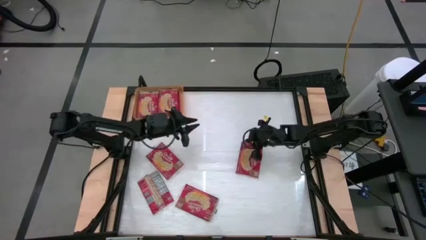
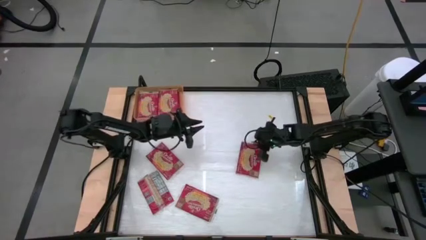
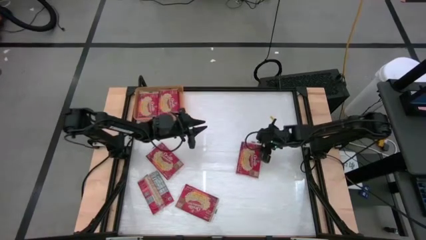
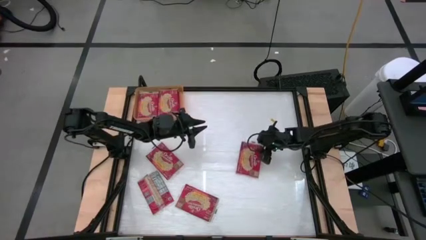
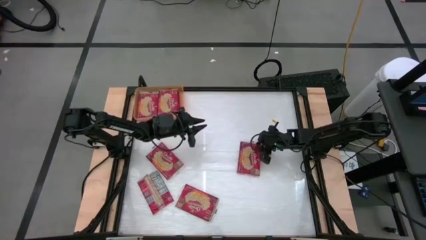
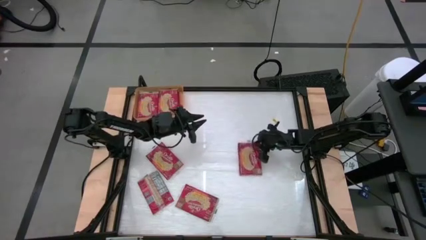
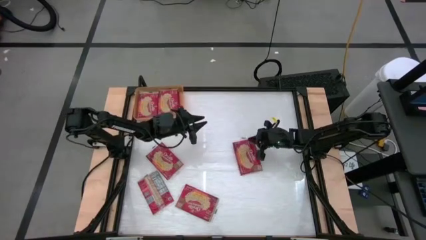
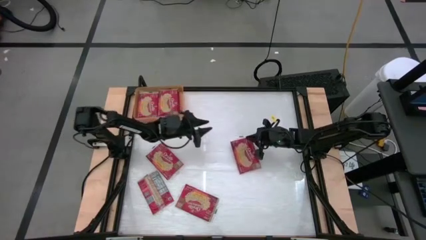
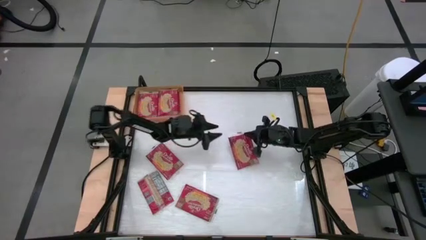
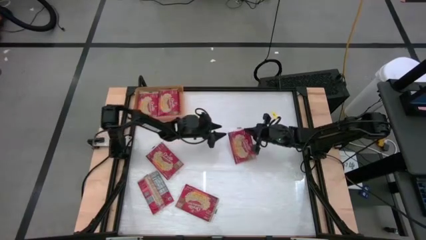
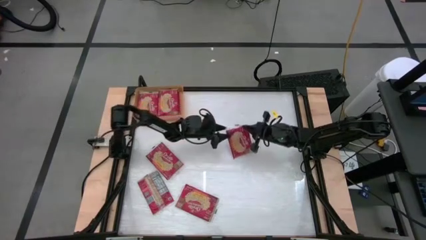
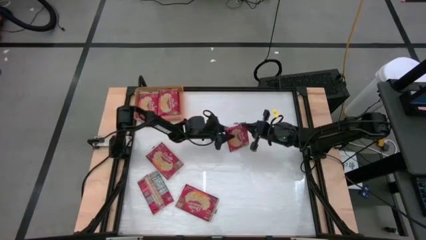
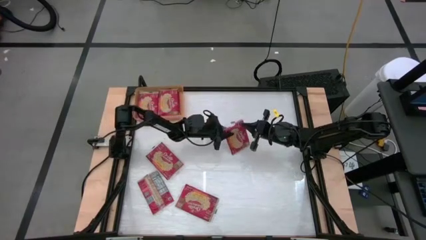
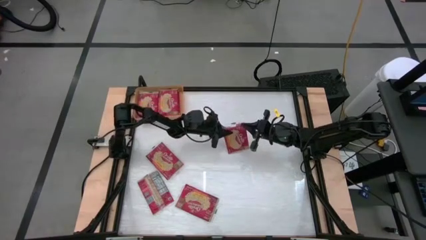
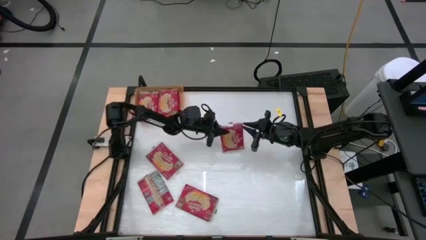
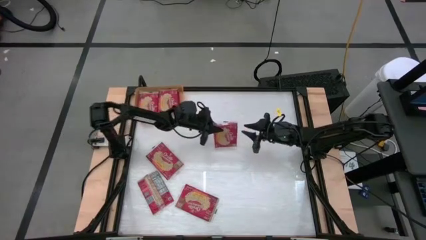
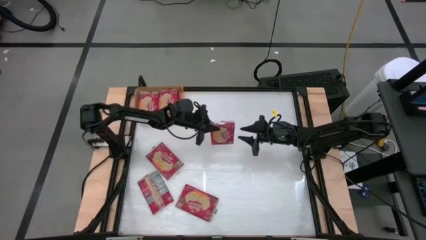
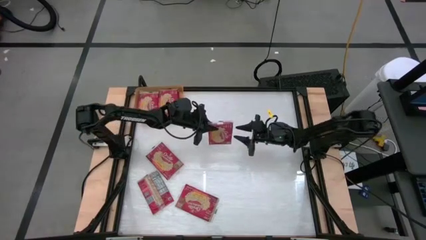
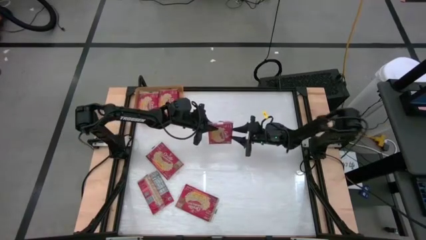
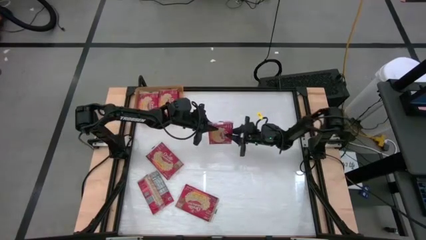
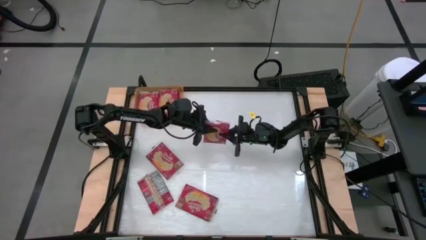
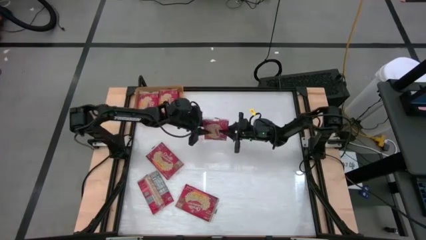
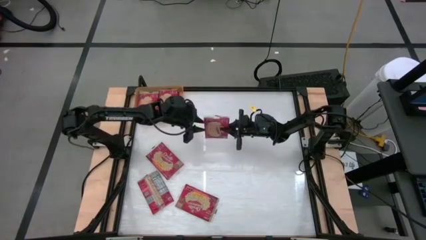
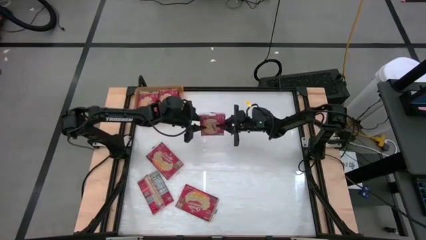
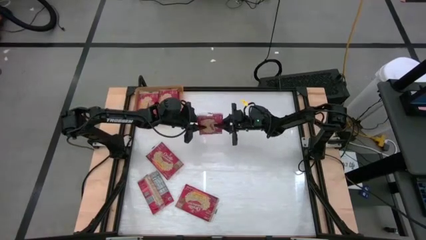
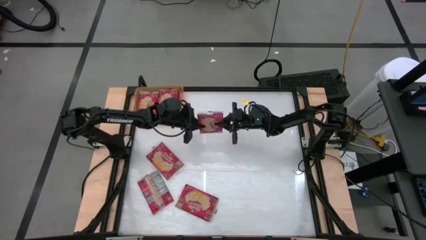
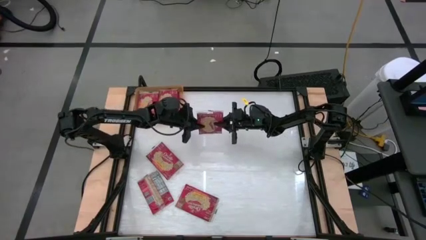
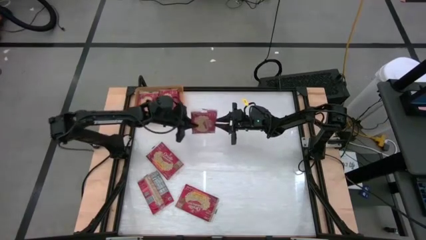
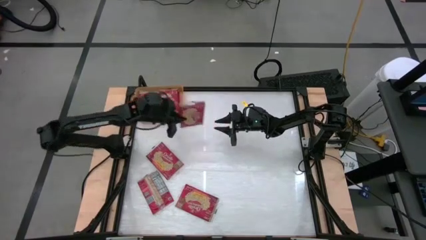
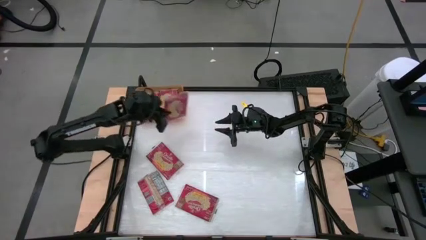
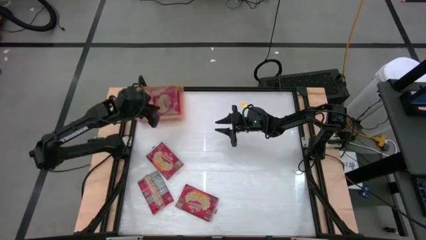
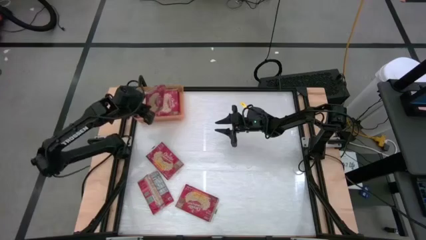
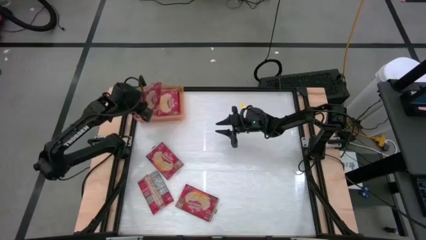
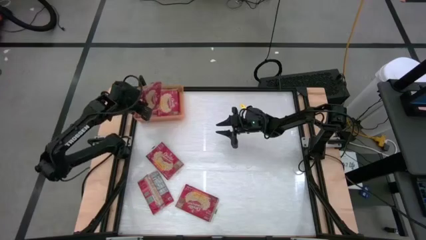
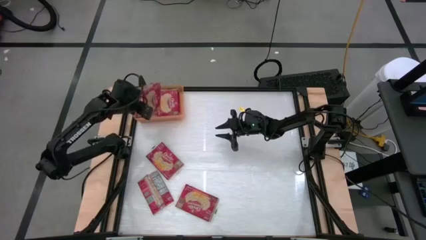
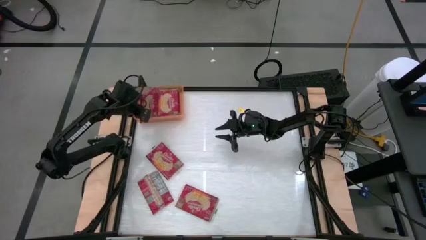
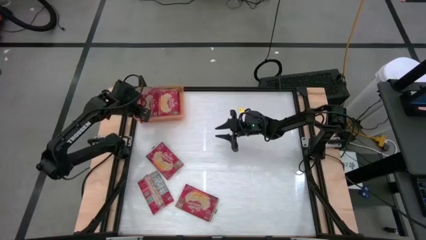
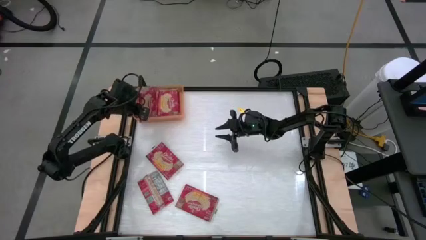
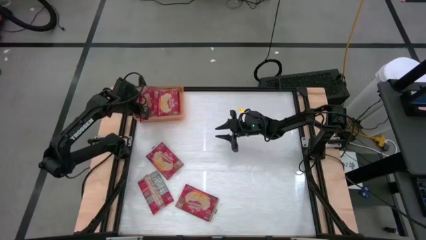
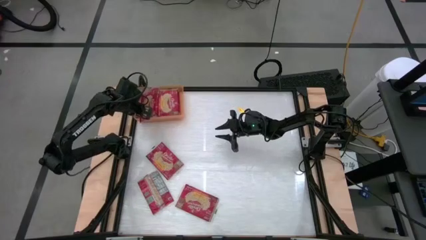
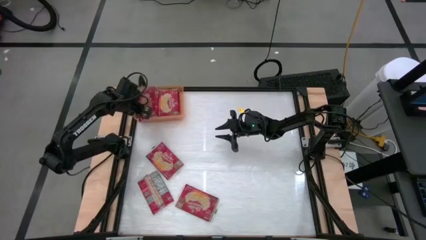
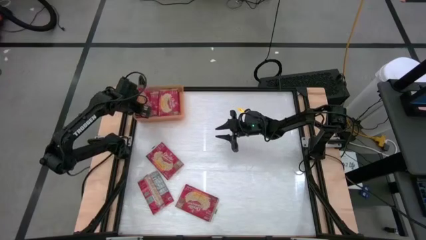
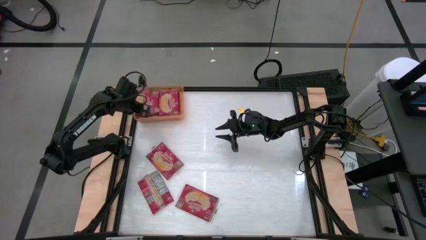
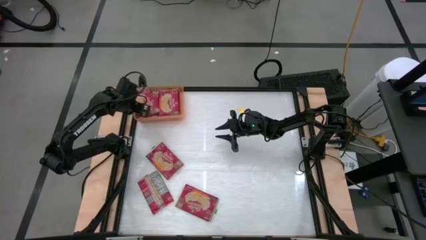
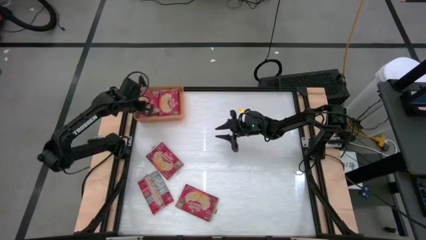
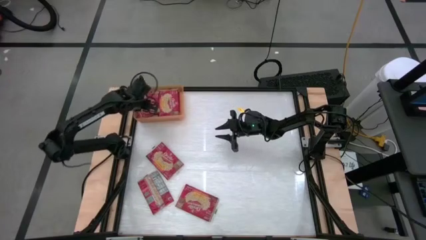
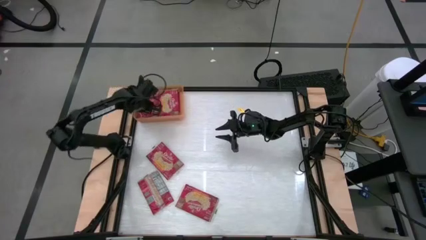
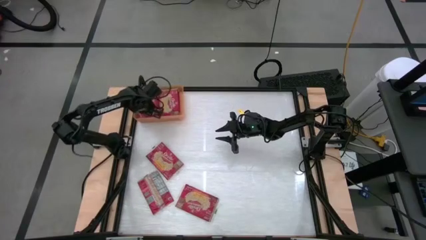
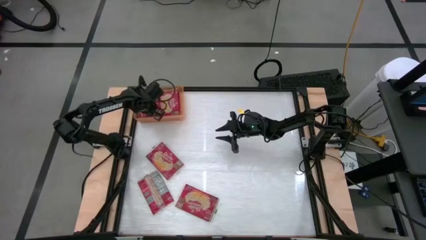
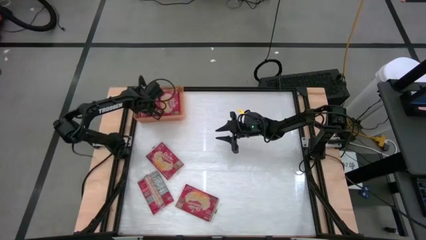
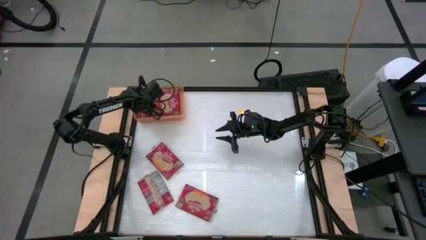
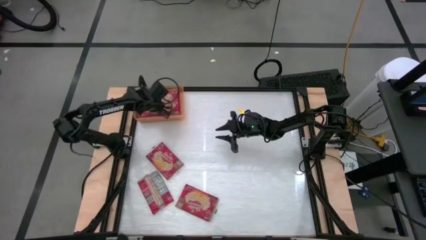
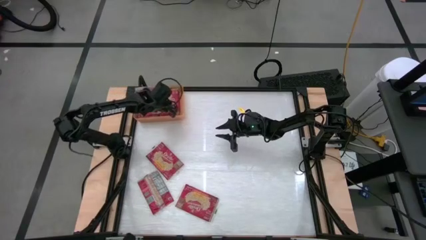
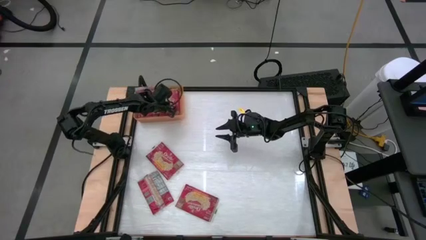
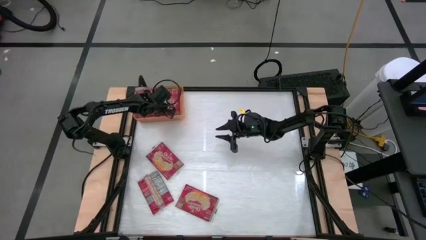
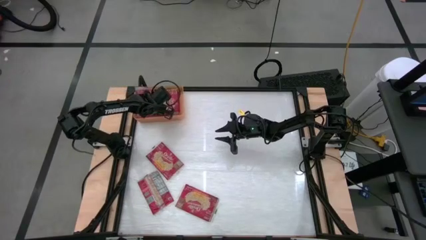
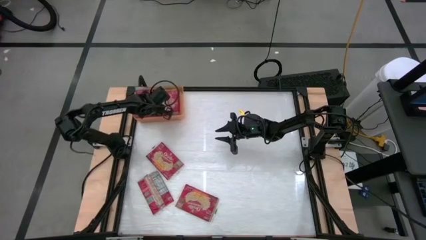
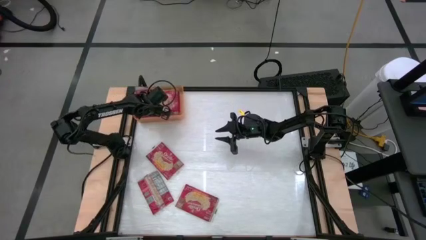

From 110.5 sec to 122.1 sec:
Task: Sort popcorn bags into baskets
Put the red popcorn bag into the orange bin

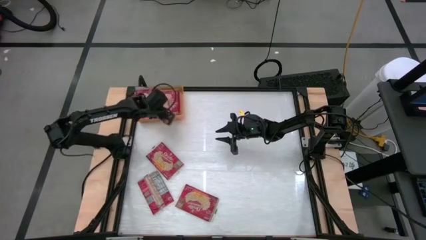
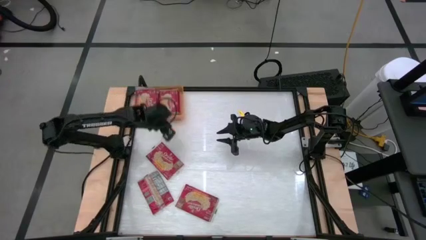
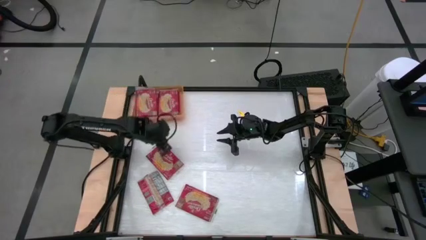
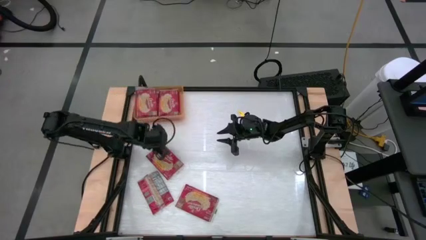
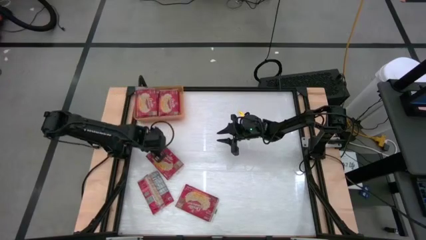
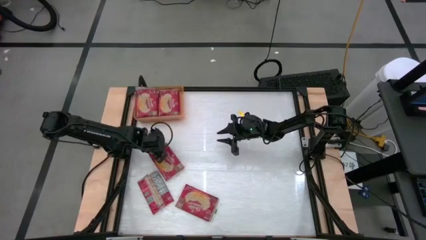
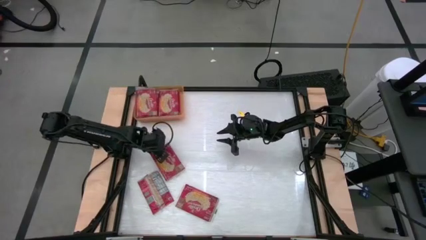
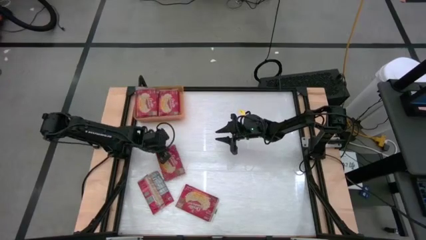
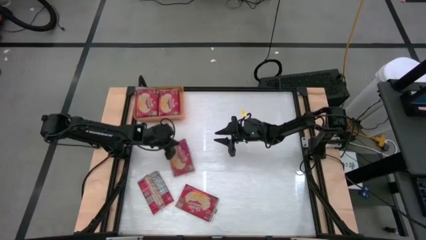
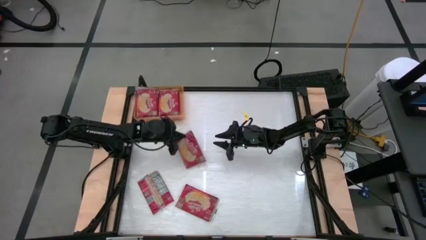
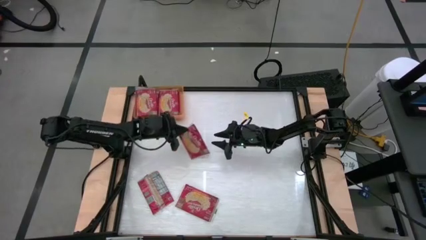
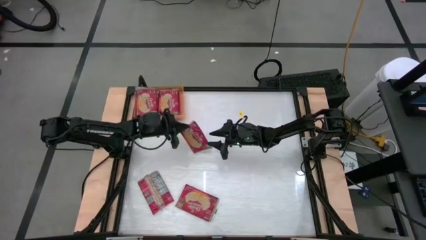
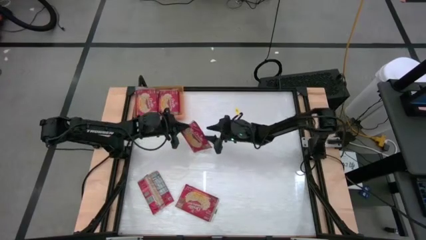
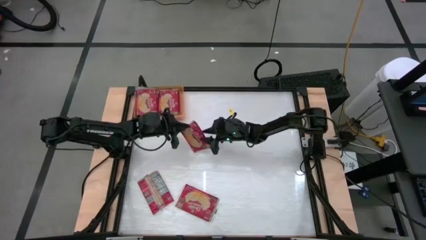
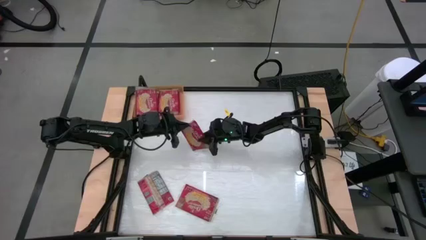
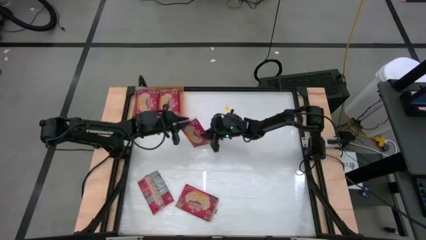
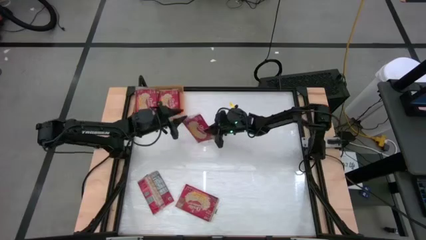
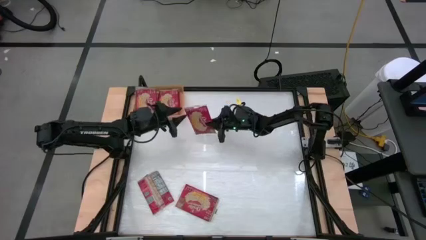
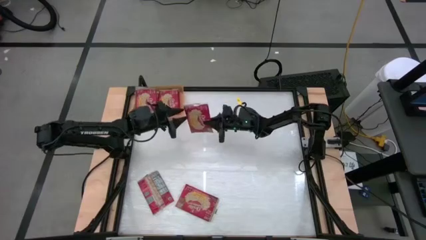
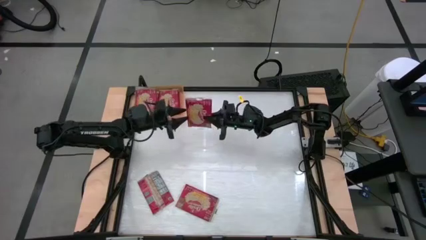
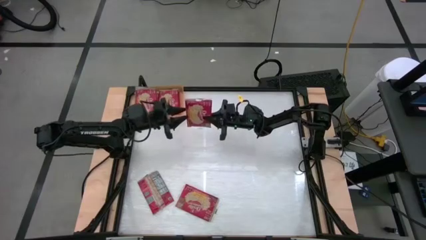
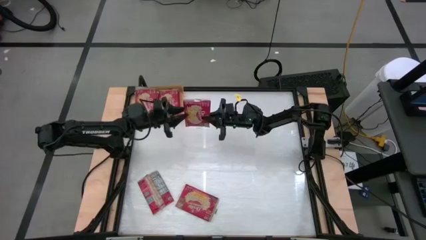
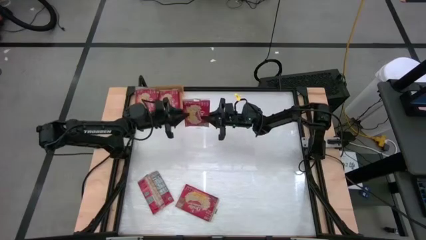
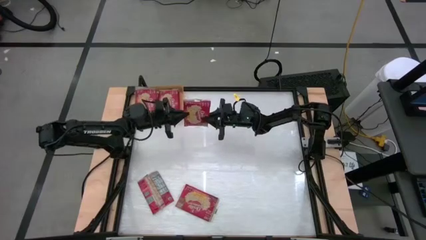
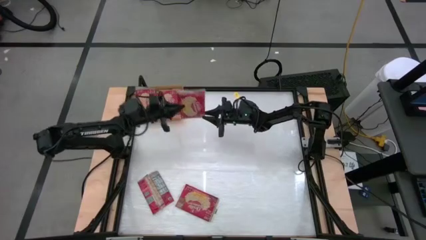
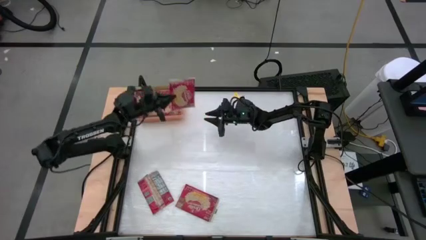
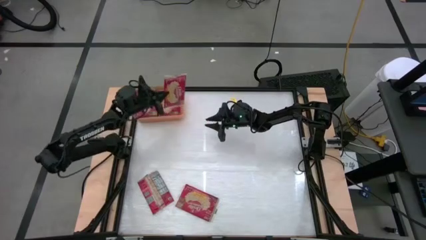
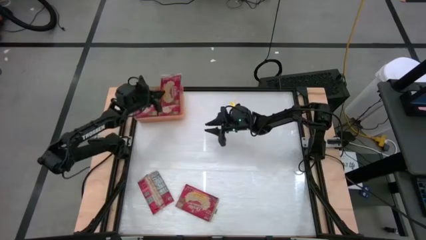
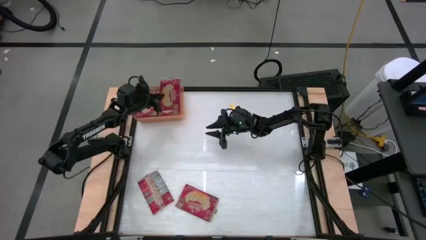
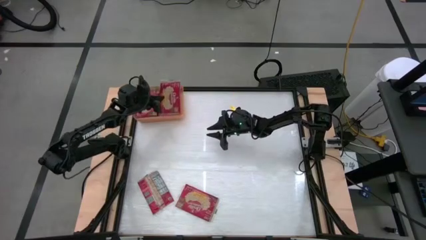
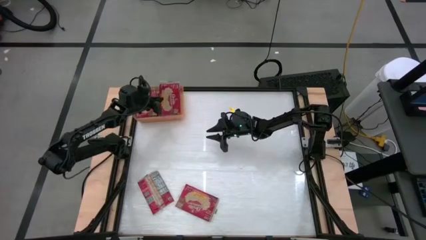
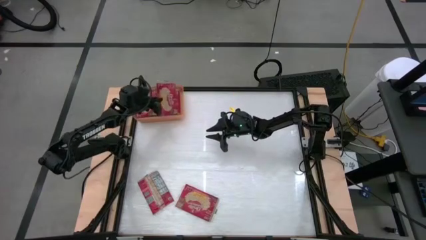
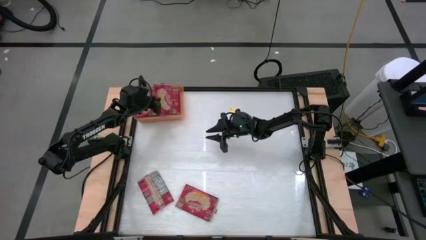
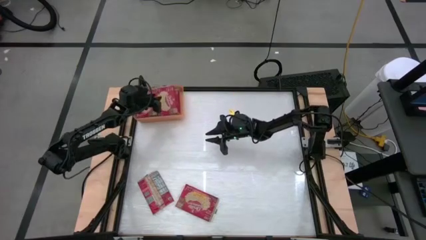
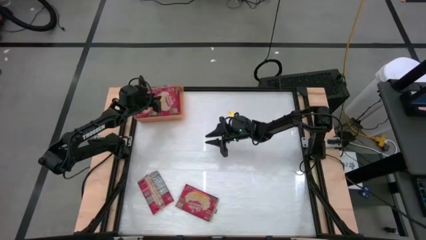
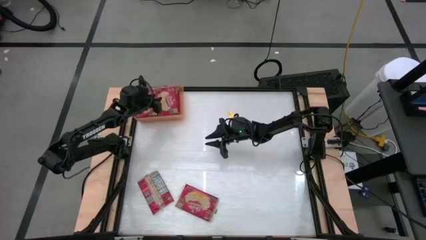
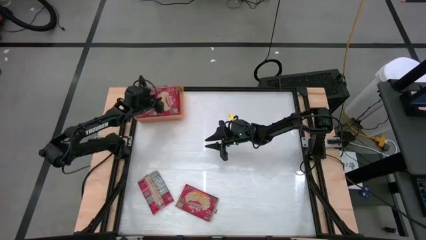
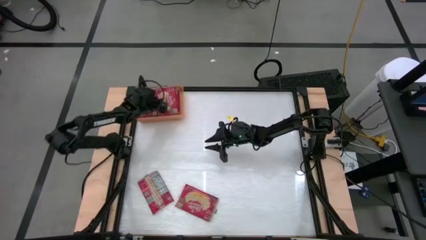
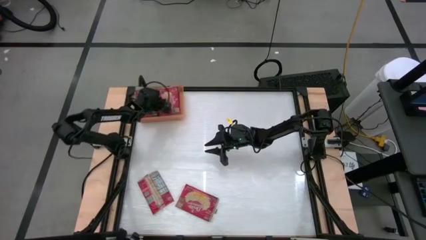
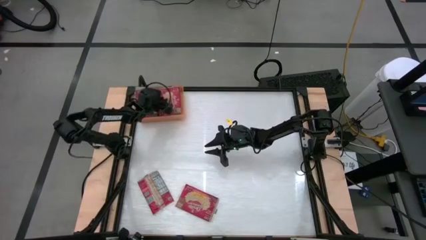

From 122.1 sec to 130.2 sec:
Put the red popcorn bag into the orange bin
